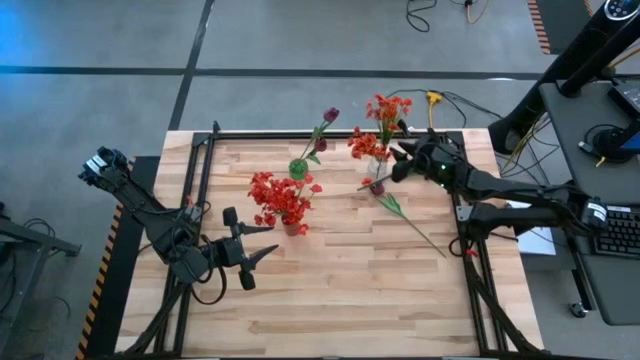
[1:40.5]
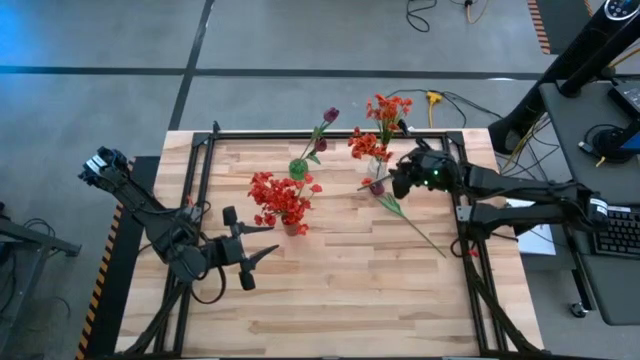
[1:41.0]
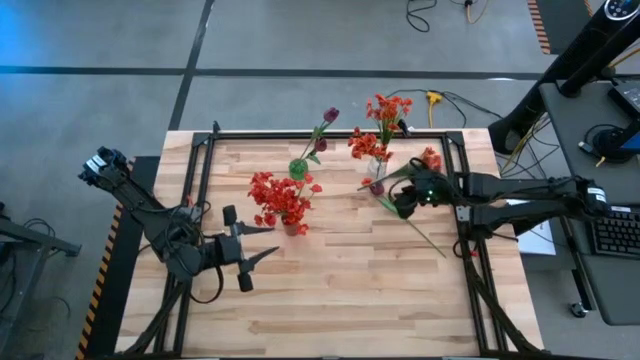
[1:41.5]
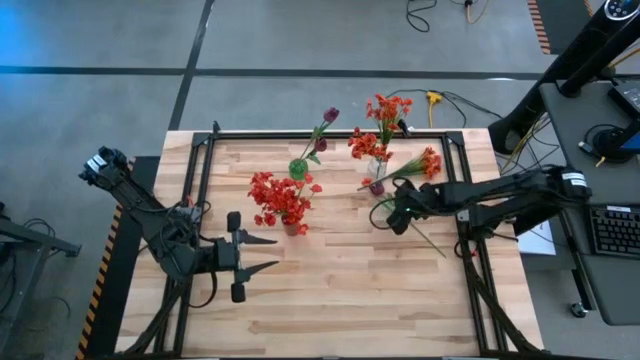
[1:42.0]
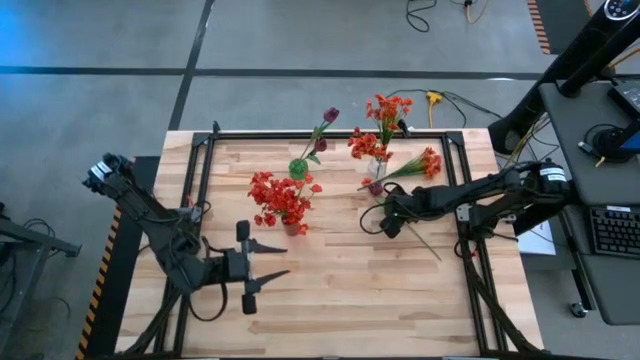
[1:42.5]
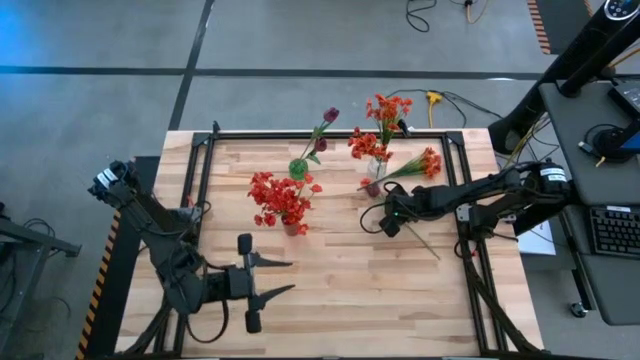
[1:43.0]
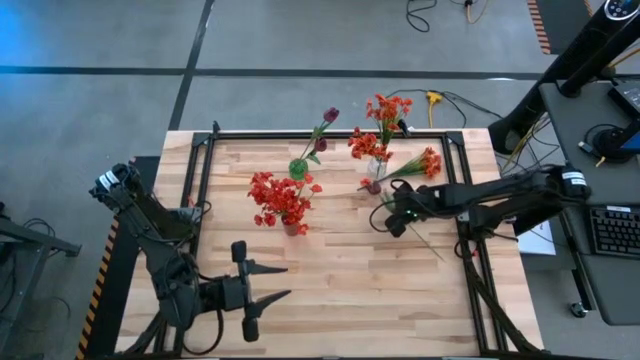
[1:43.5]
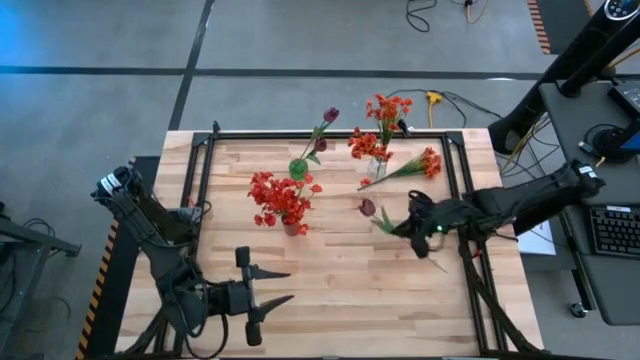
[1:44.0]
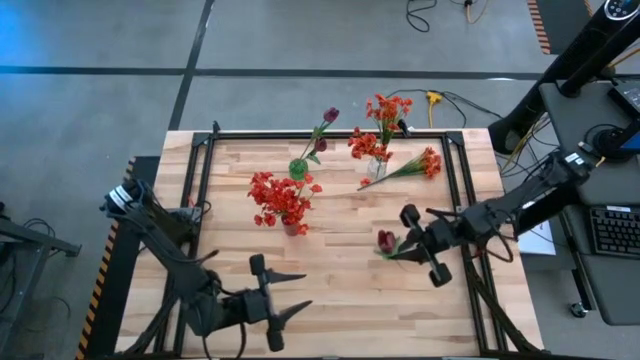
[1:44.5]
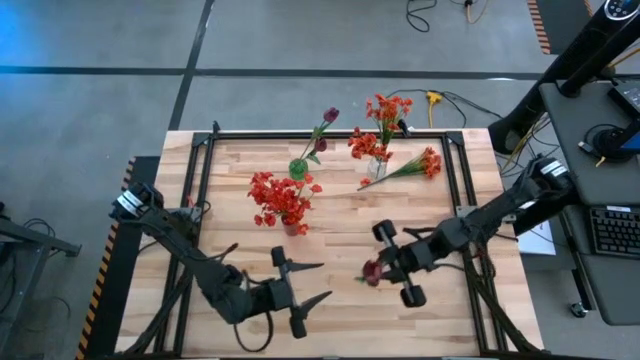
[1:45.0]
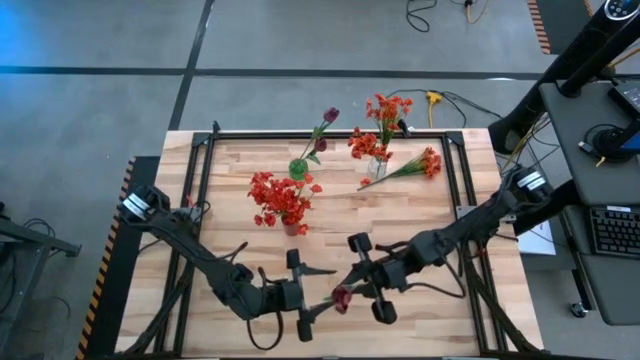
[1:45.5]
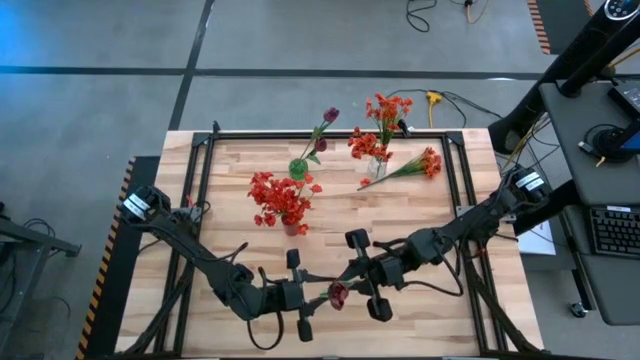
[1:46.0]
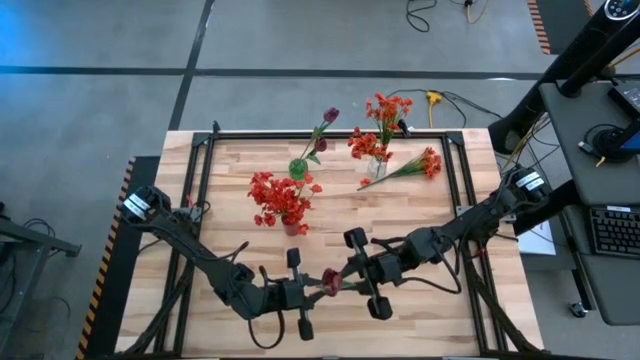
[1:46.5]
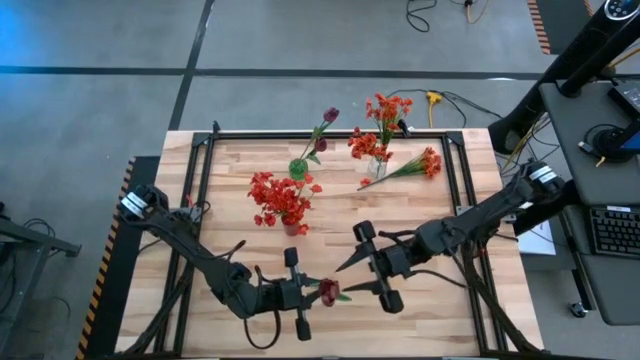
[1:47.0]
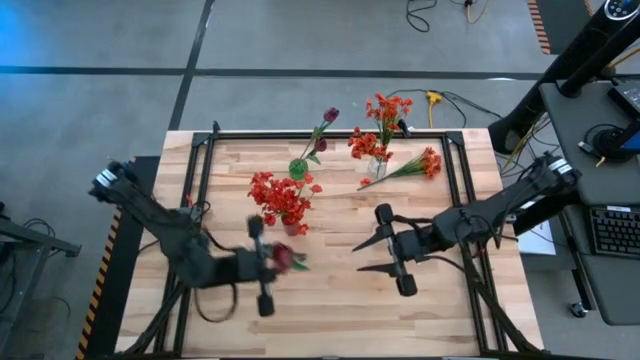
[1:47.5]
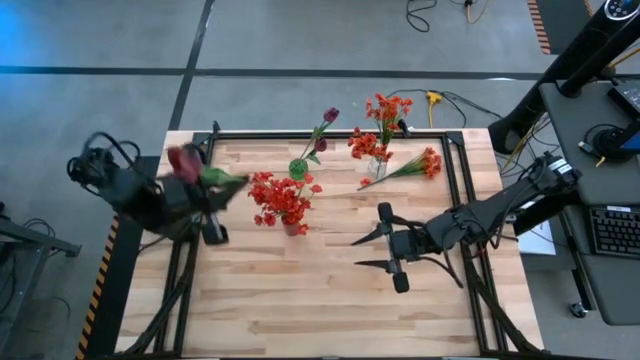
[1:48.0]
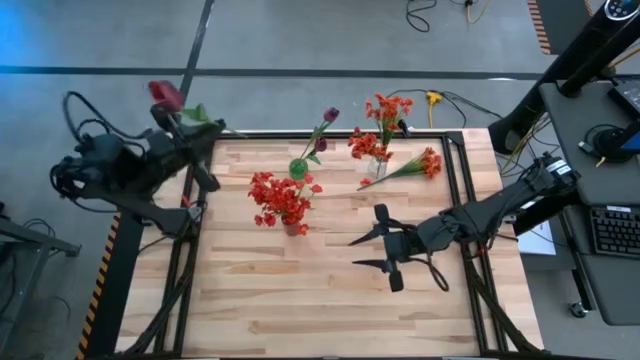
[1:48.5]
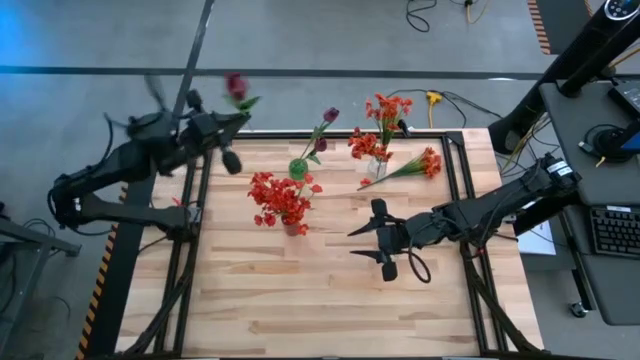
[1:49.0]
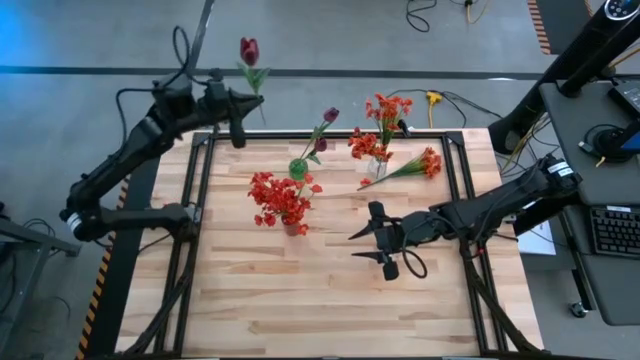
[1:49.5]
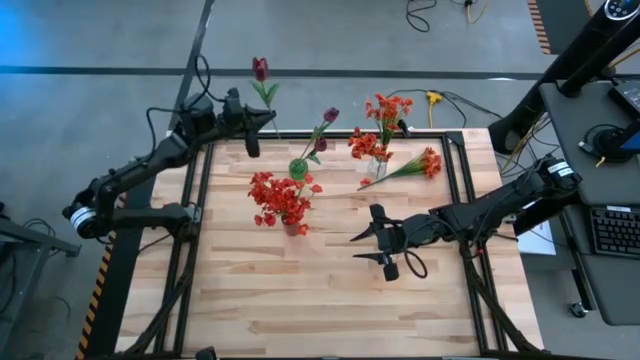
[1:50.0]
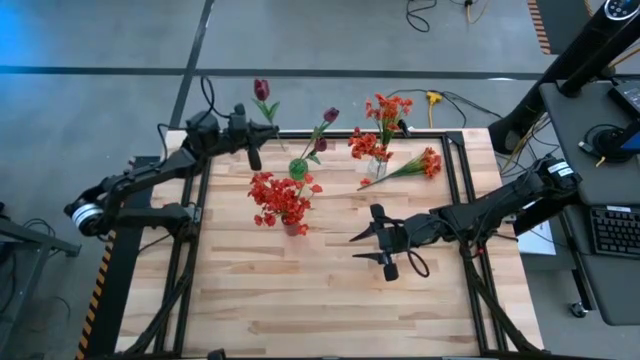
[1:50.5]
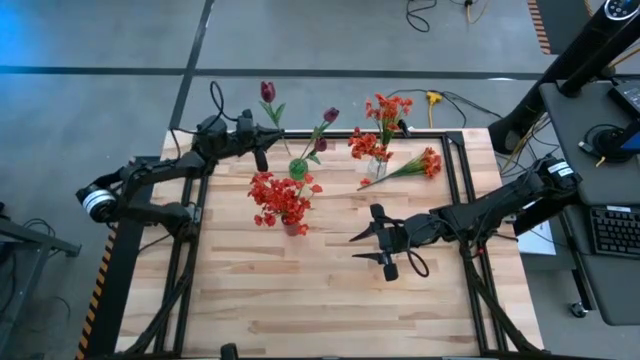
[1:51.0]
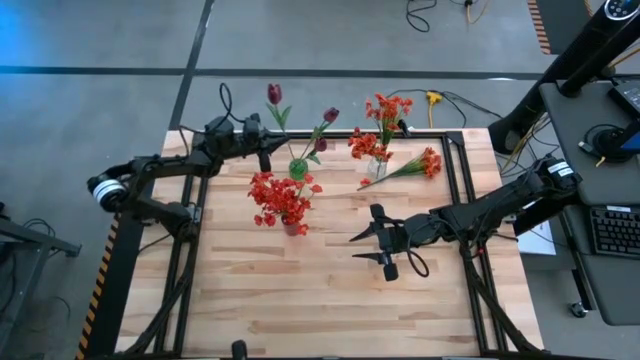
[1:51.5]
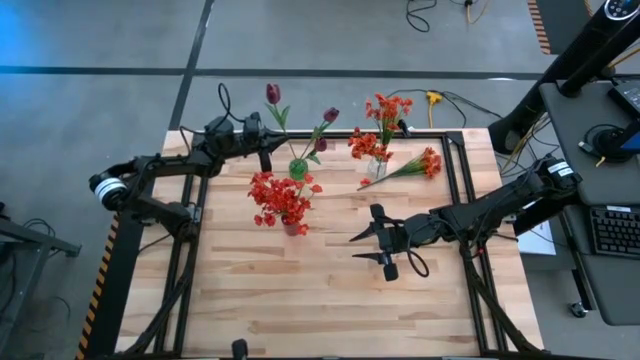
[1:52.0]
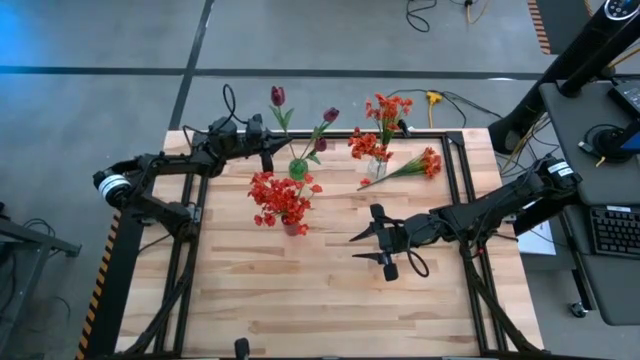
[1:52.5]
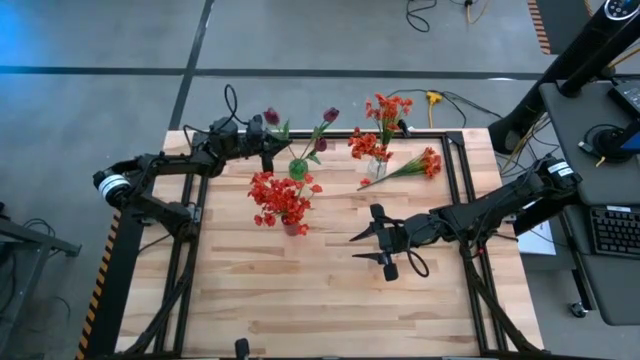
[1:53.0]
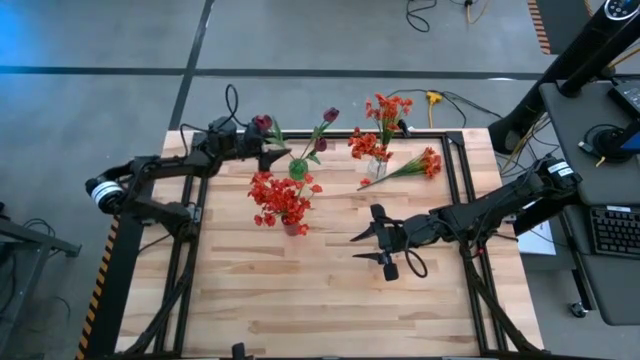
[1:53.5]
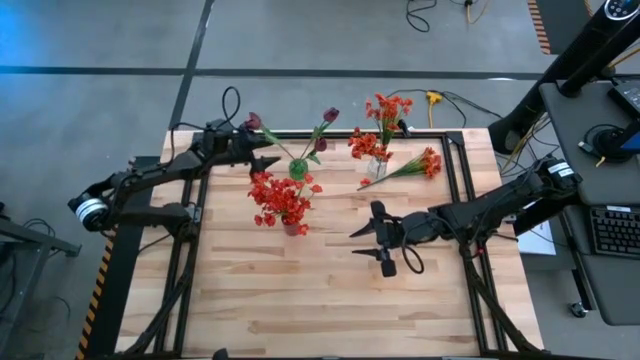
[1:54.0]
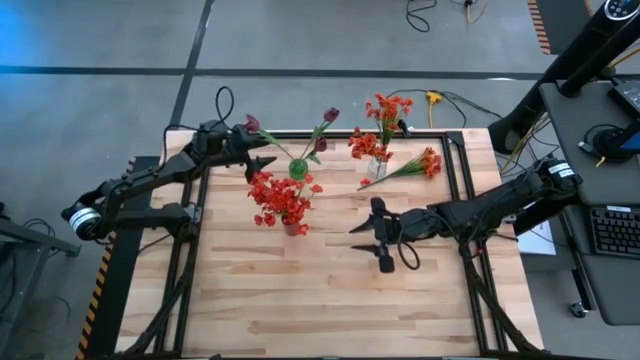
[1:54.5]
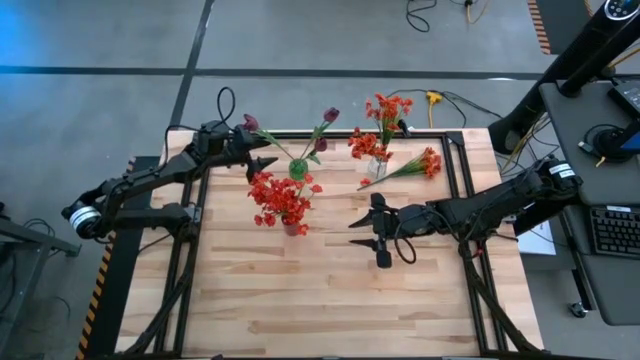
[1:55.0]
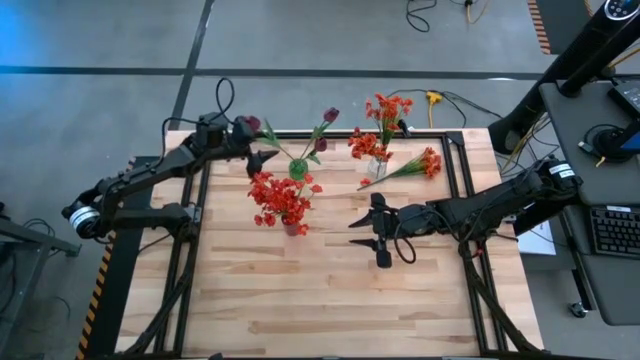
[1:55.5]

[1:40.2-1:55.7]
Task: Sort flowers into vase by color
Put the dark red tulip into the green vase

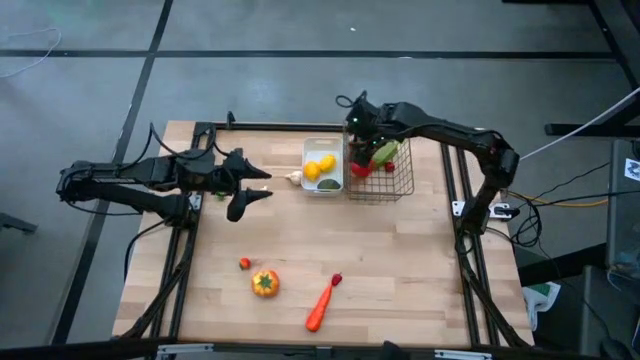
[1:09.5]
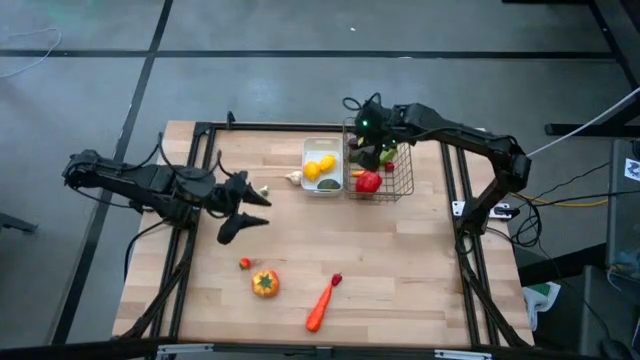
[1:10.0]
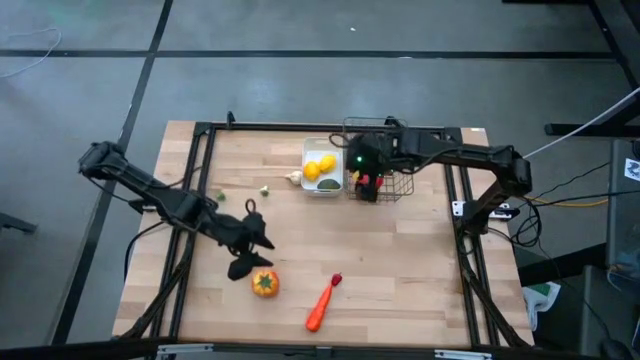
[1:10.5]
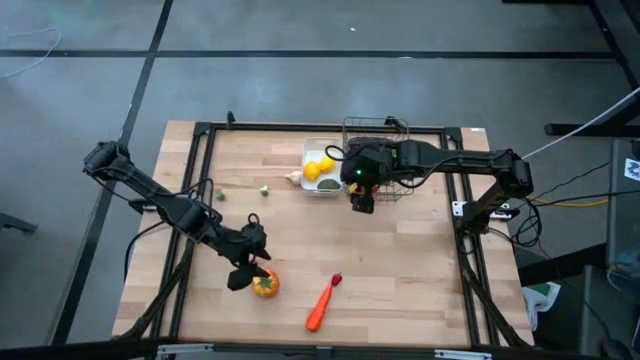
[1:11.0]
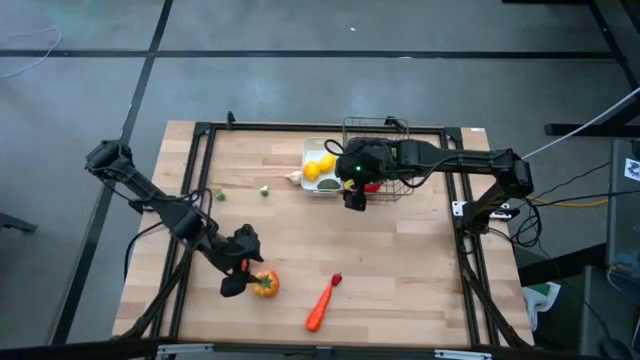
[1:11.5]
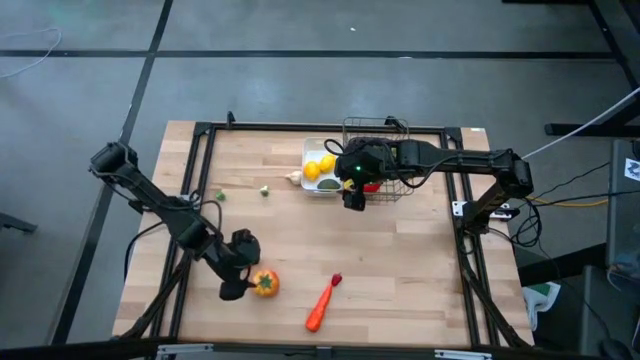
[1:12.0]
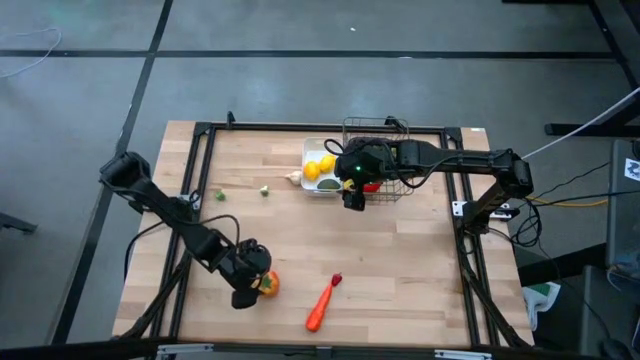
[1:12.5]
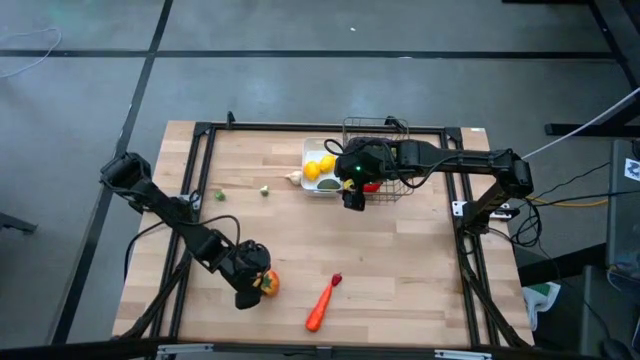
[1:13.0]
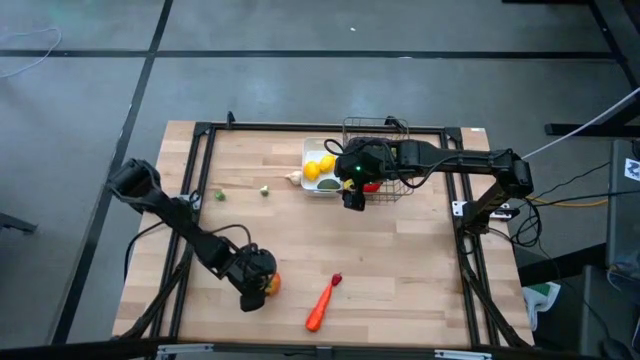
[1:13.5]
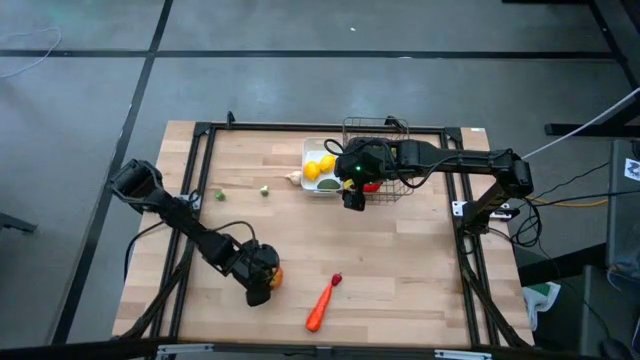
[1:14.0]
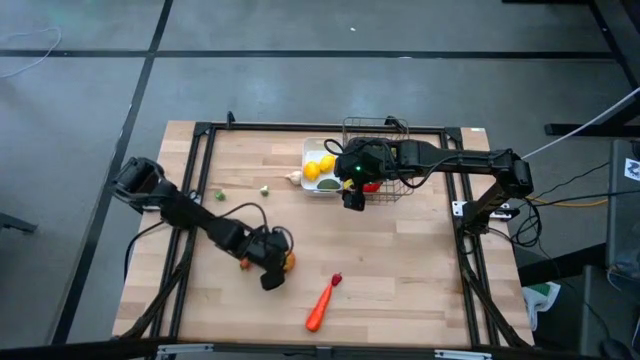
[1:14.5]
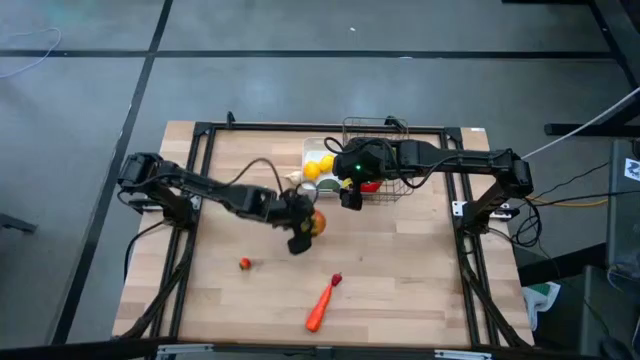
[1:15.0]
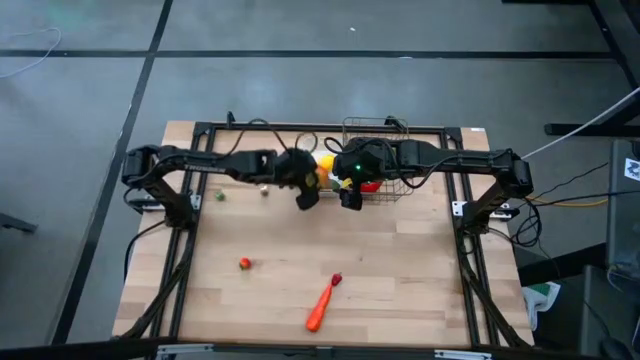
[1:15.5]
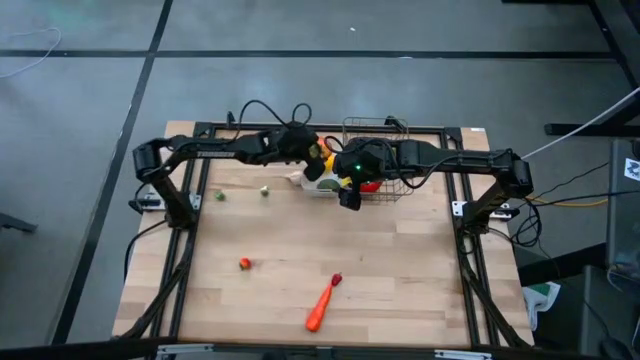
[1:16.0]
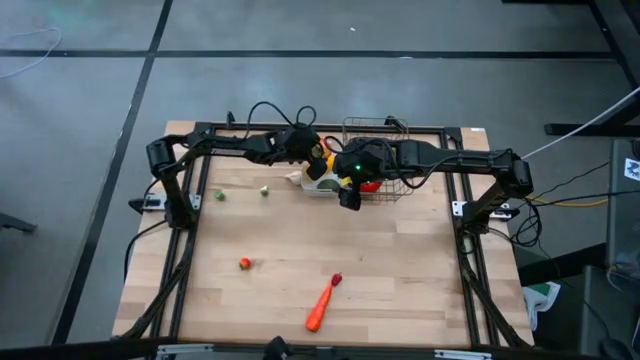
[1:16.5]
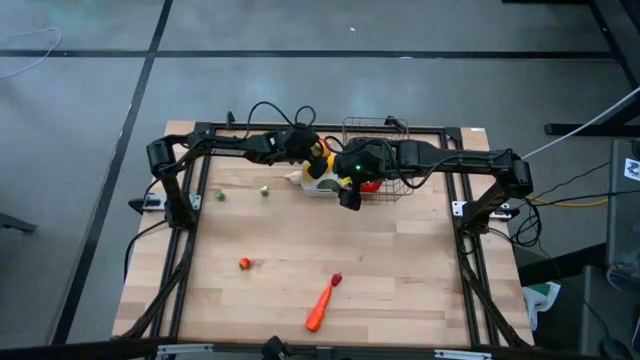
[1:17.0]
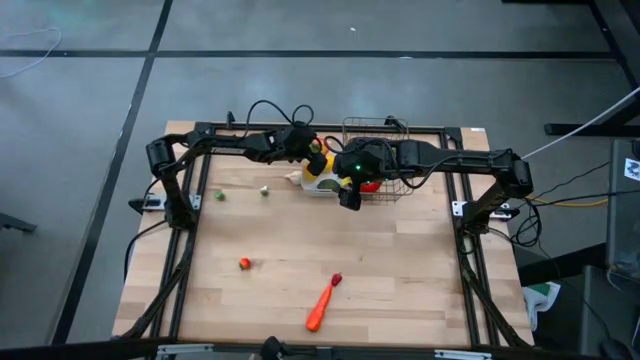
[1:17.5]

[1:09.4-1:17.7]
Task: Sort produce into baskets
Put the orange tomato into the white bin
